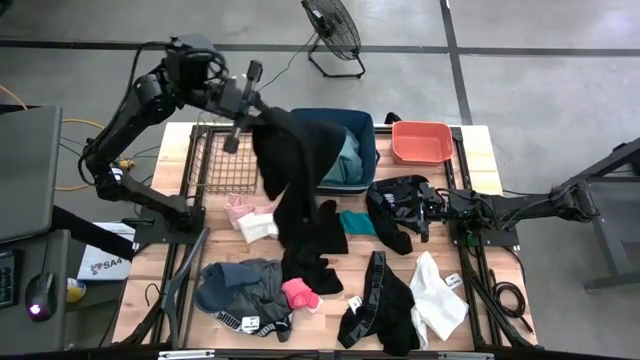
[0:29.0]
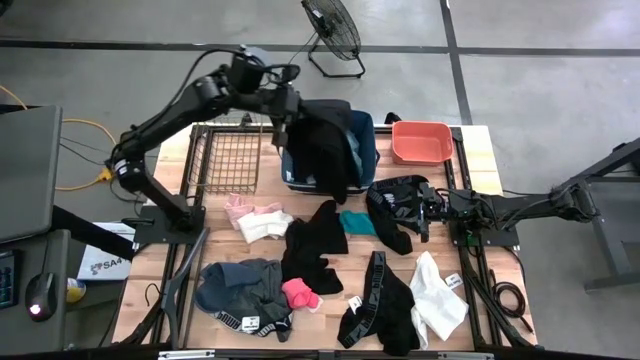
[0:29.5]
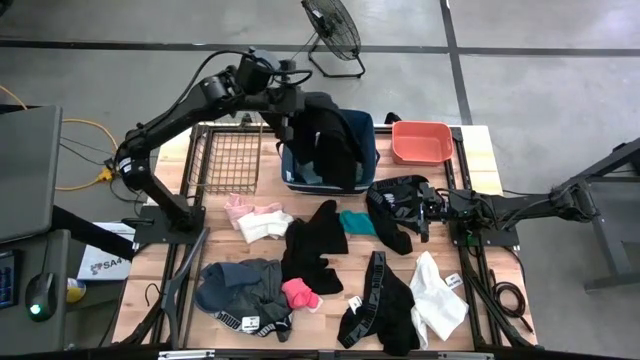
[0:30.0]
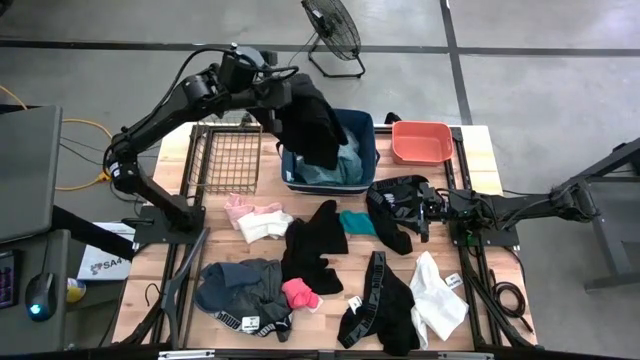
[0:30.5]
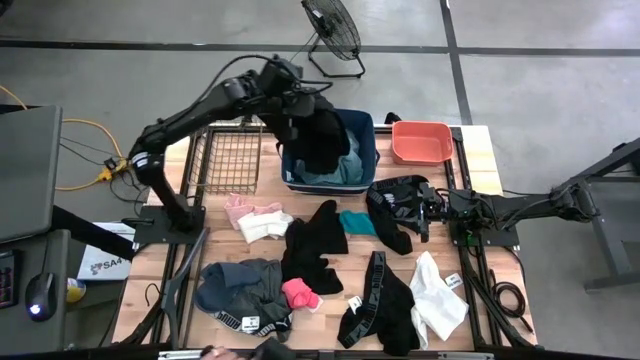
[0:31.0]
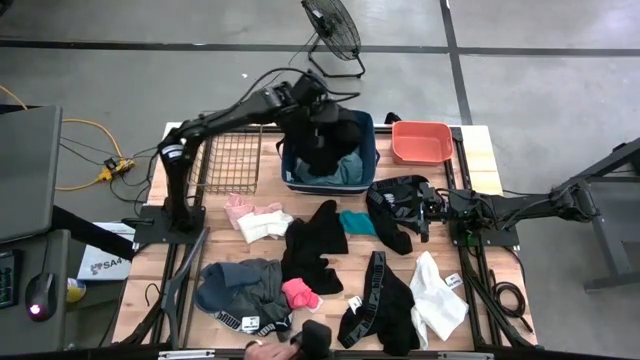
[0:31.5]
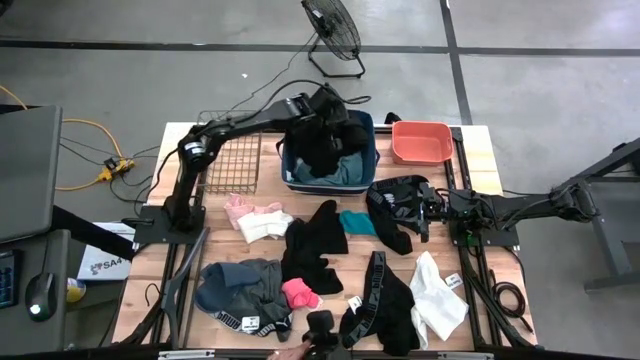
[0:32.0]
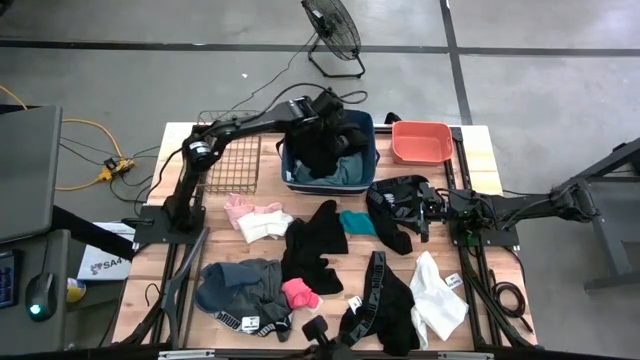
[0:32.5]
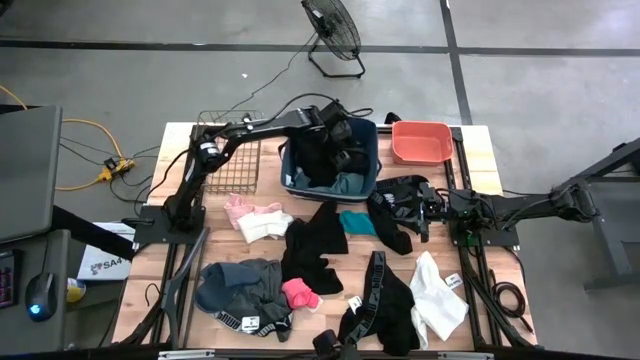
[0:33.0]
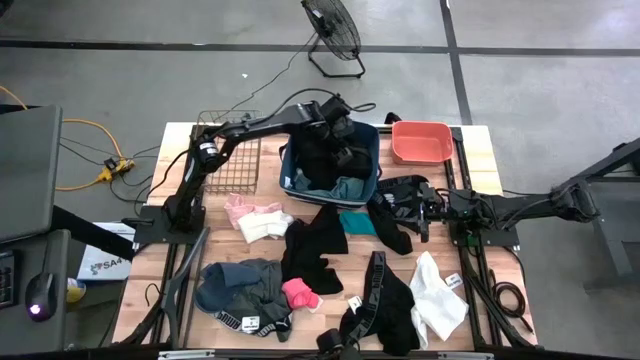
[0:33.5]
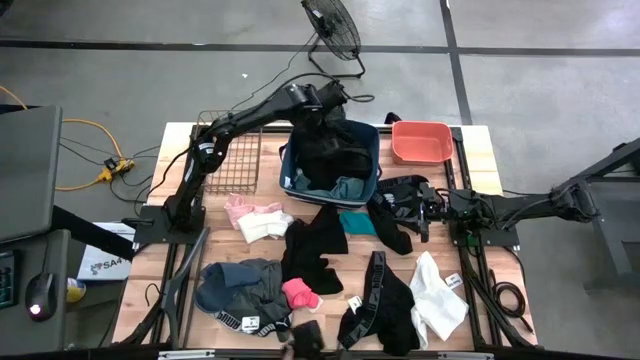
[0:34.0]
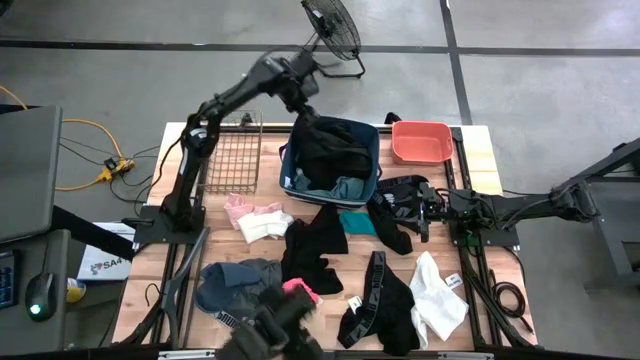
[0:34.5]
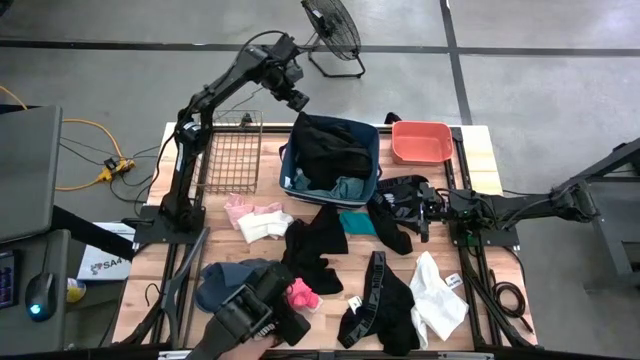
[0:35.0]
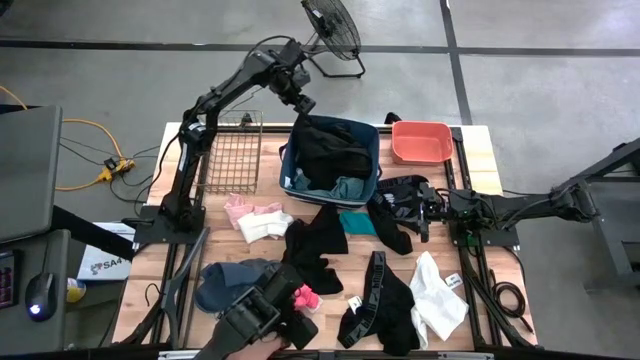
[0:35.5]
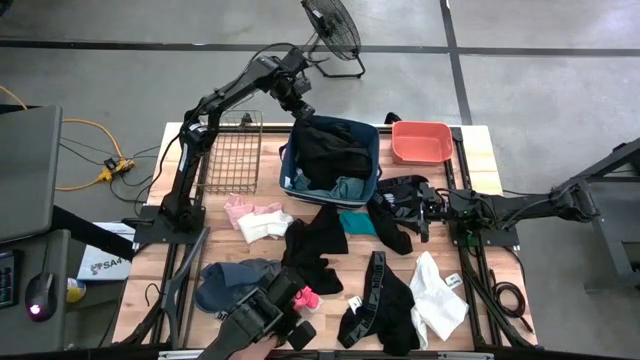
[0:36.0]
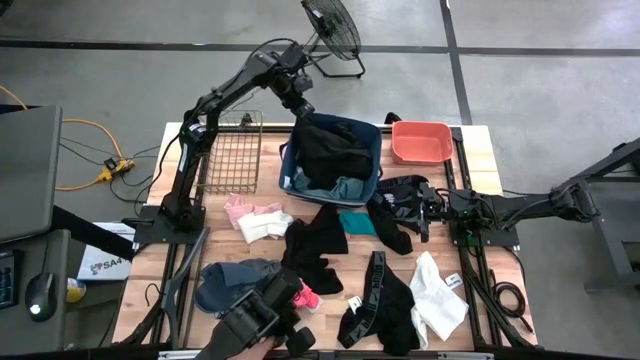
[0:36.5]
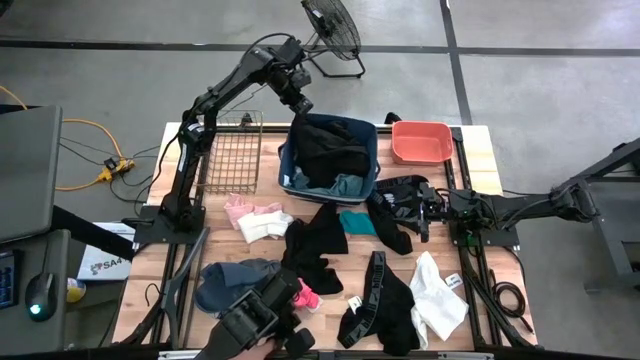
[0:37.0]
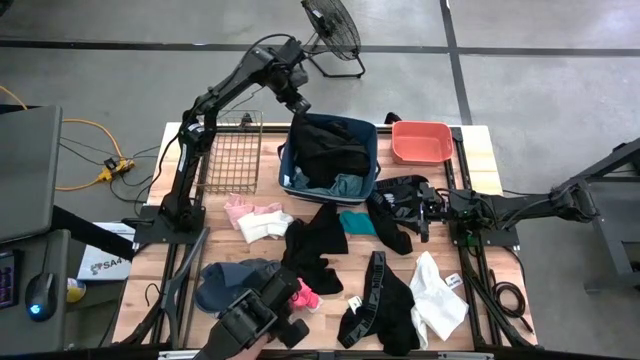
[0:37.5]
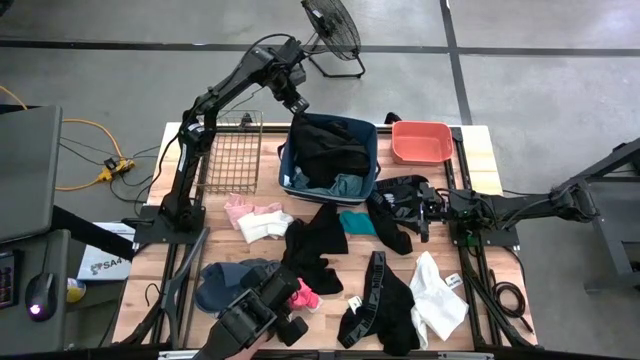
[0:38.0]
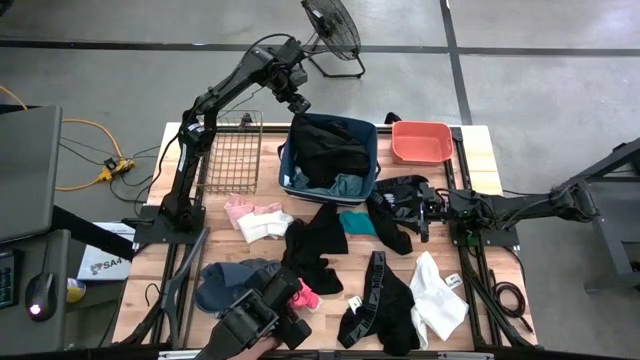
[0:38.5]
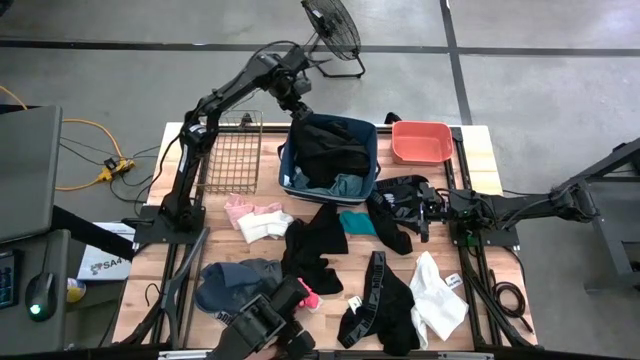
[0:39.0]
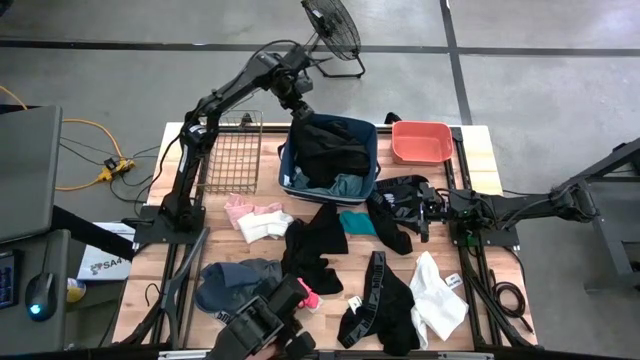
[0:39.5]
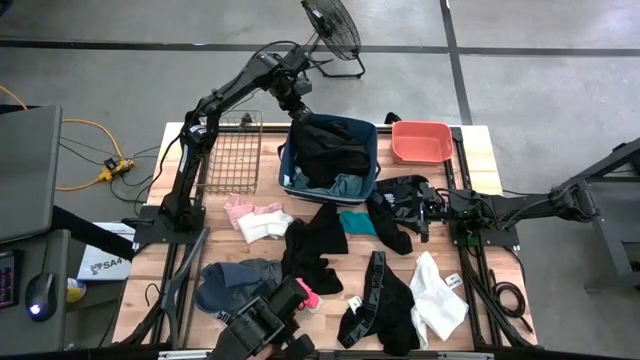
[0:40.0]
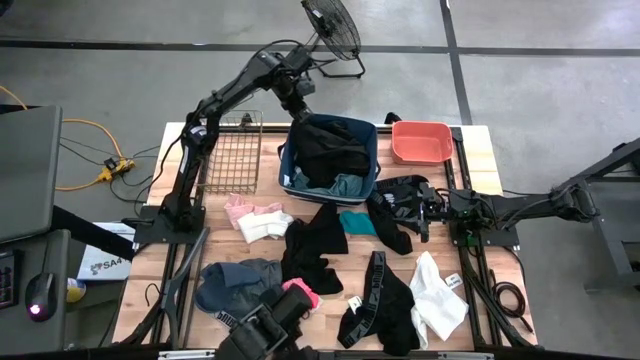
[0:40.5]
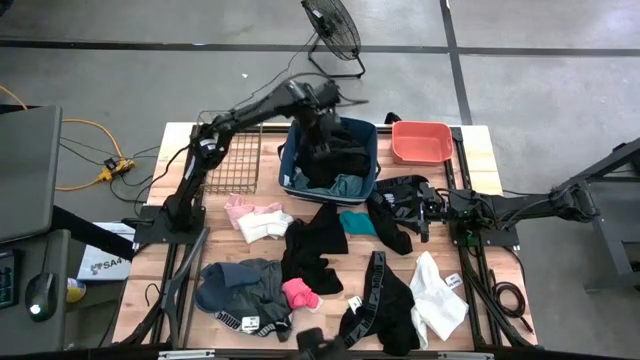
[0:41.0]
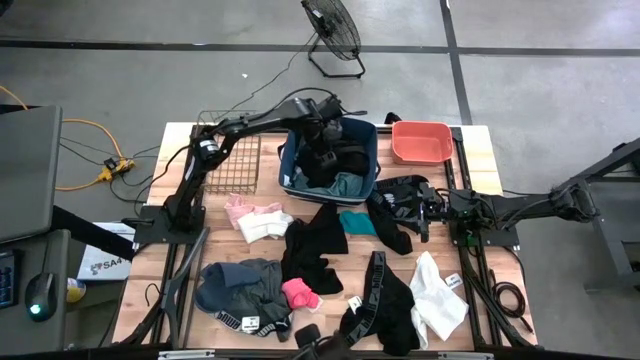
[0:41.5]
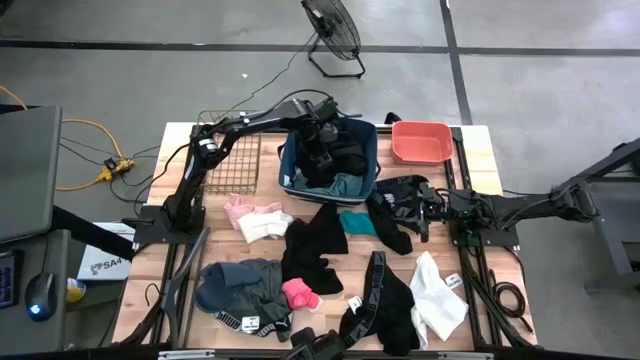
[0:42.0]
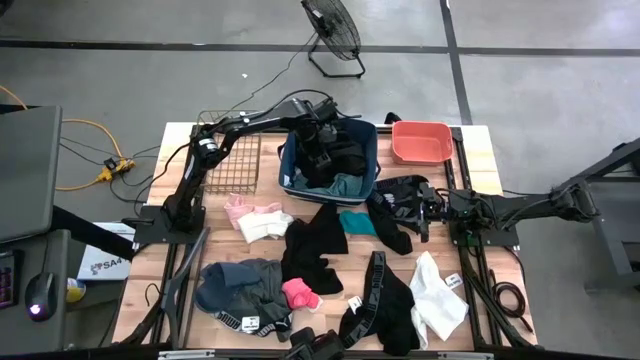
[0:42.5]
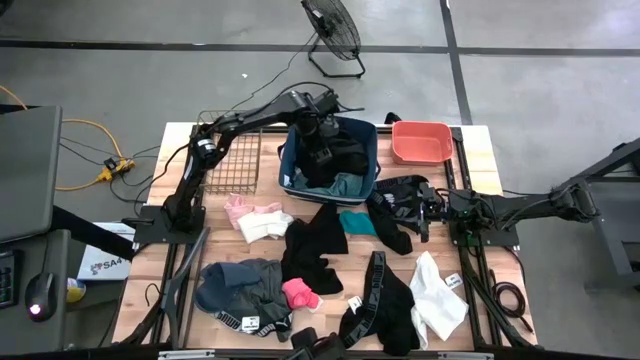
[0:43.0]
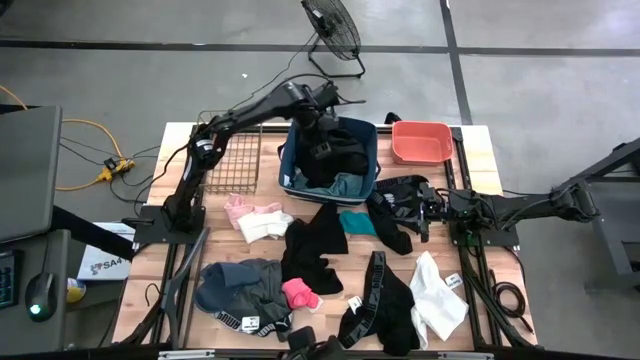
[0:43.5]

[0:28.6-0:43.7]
Task: Pick & Place Cloths
Put black shirt into the blue laundry organizer

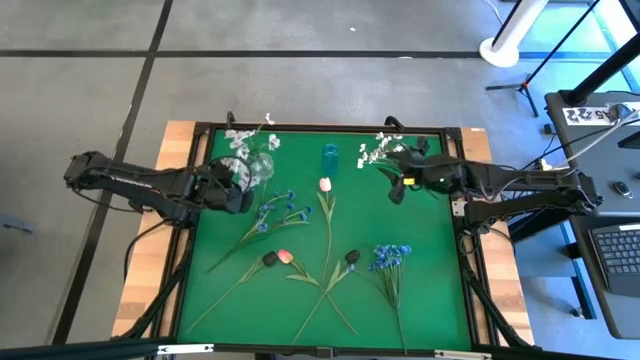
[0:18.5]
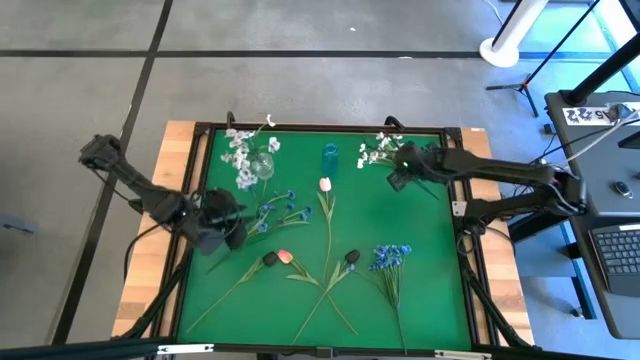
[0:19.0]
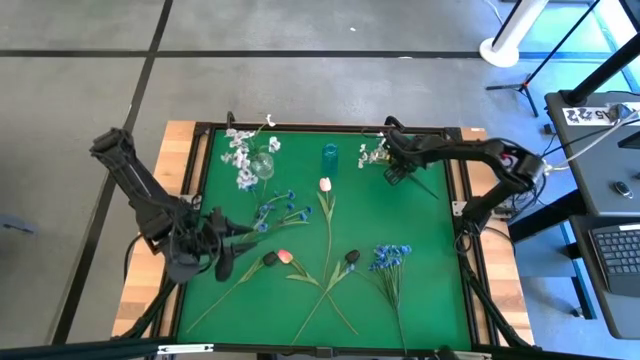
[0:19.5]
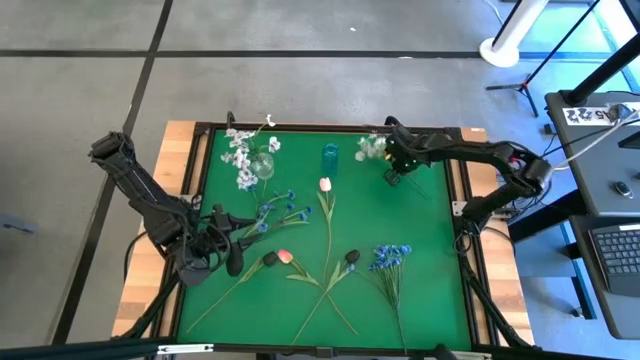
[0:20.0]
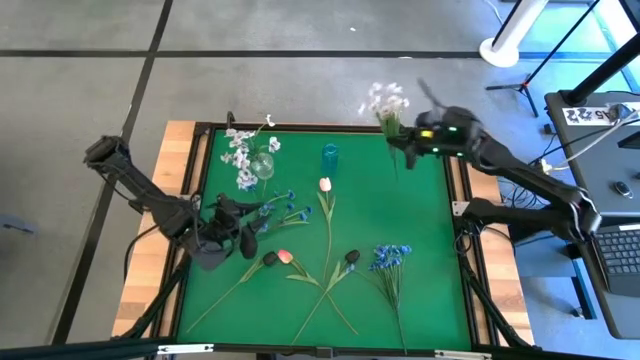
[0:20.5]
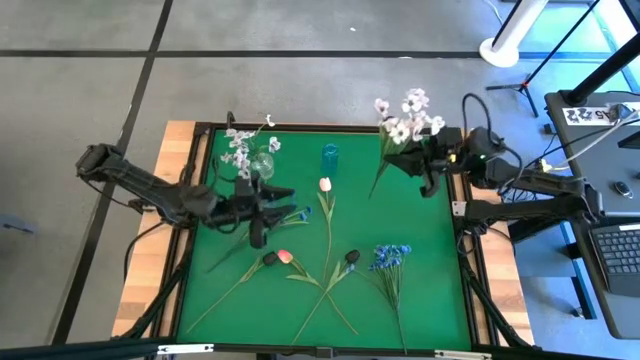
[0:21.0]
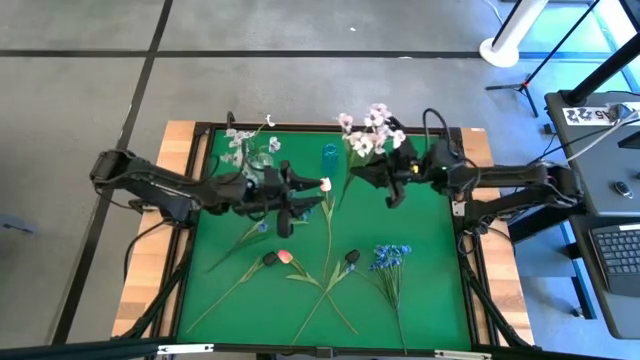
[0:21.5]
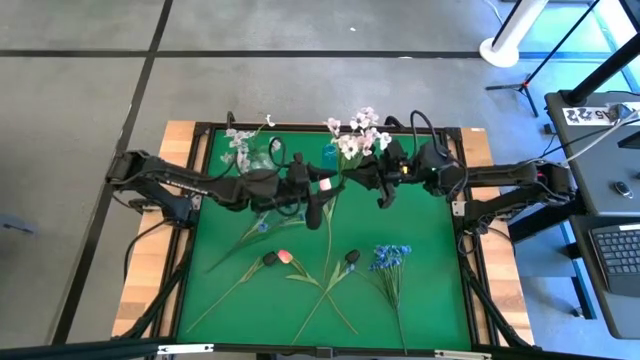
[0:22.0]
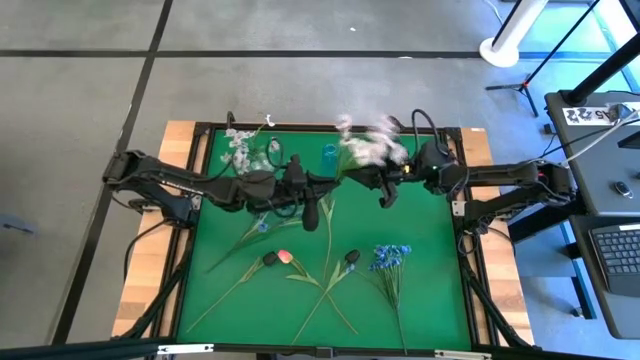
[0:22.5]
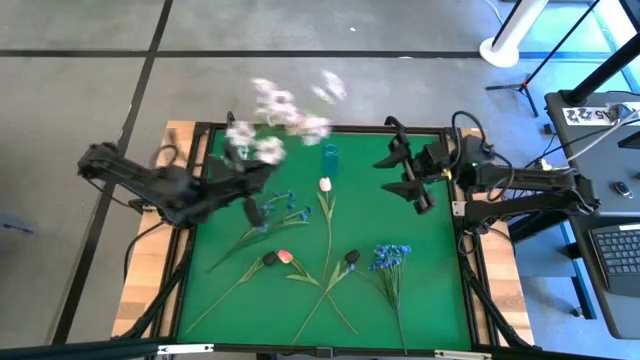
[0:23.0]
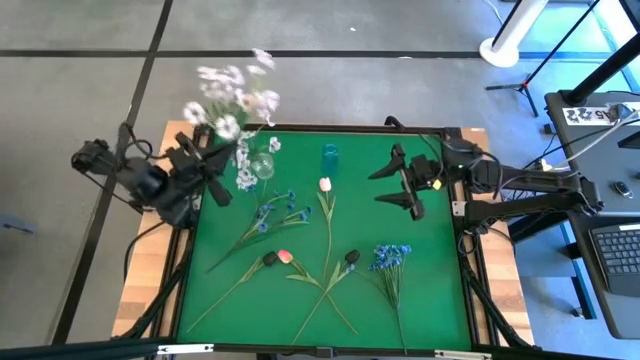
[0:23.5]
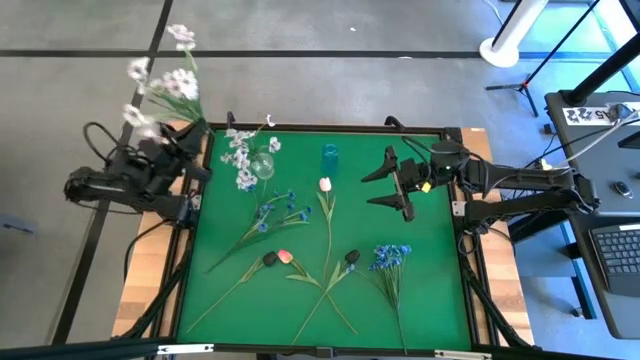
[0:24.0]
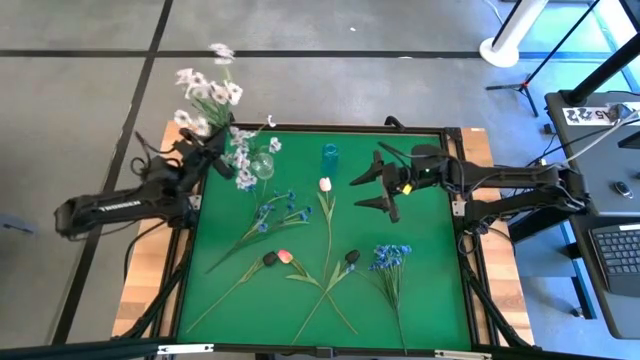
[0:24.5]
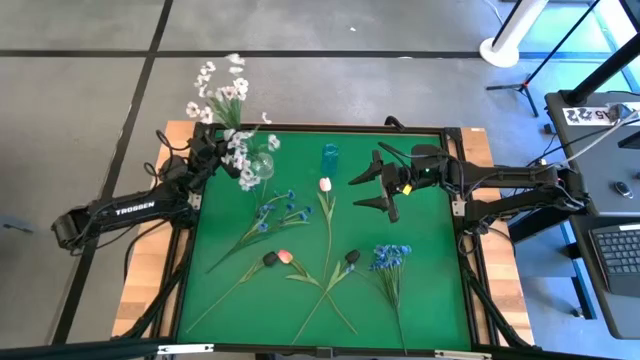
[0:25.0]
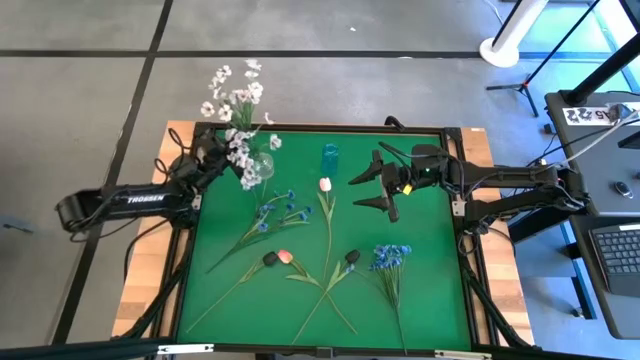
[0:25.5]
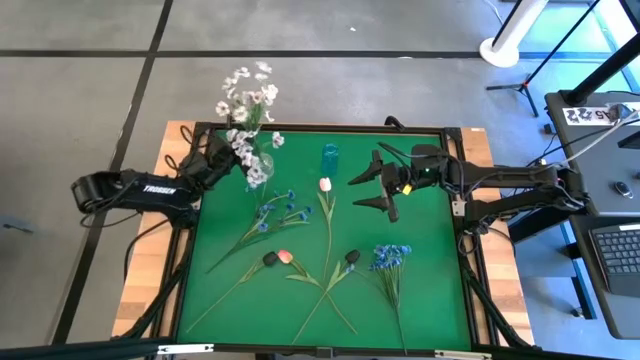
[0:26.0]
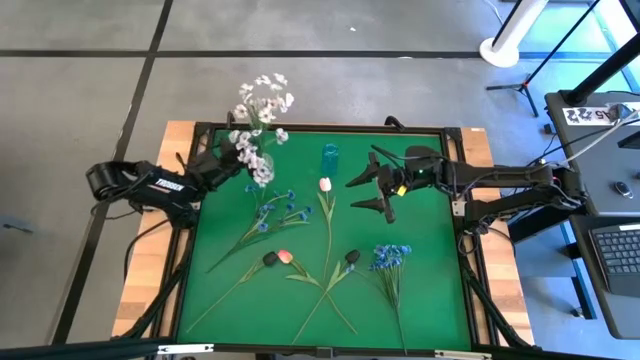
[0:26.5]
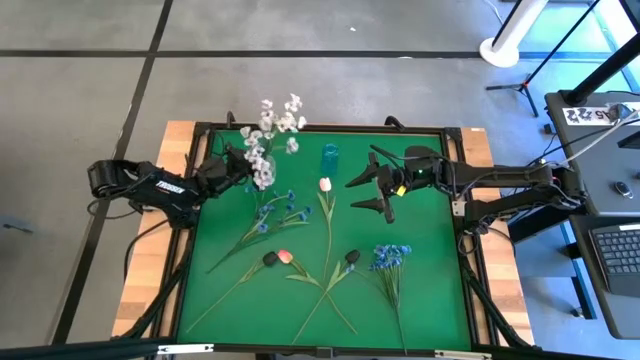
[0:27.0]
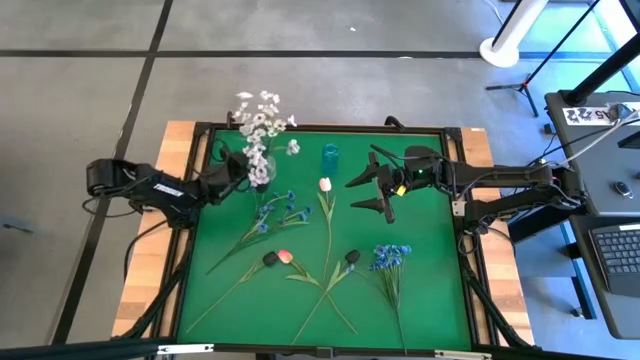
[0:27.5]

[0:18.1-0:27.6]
Task: Sort flowers into vase by color
Put the white flowers into the transparent vase
